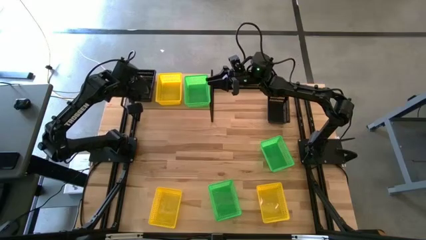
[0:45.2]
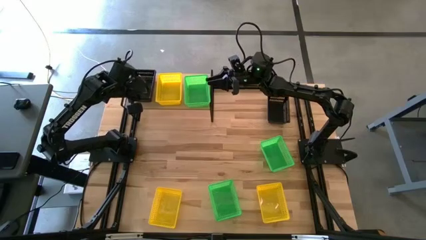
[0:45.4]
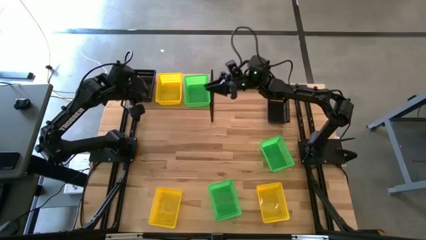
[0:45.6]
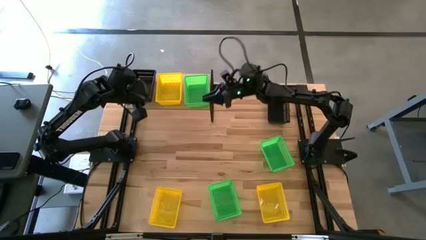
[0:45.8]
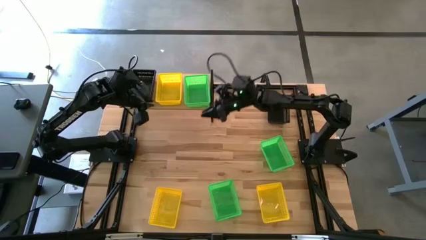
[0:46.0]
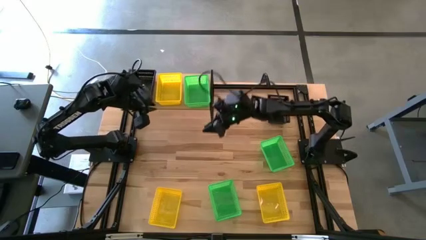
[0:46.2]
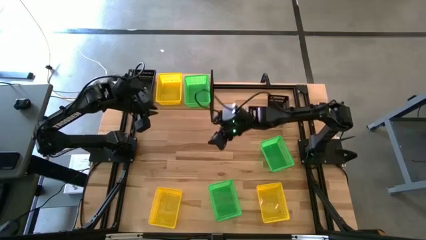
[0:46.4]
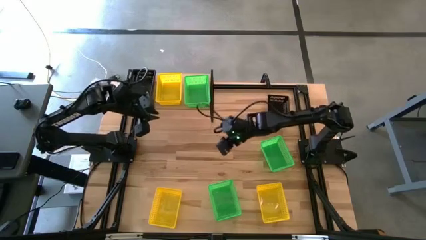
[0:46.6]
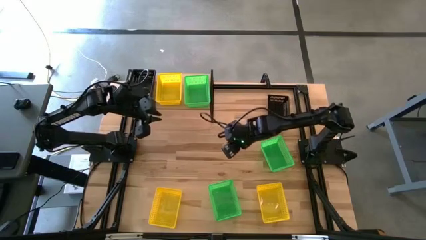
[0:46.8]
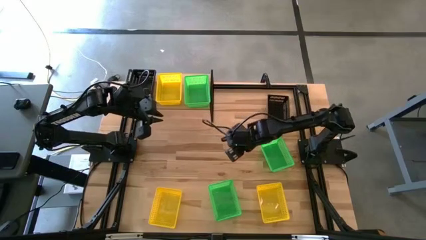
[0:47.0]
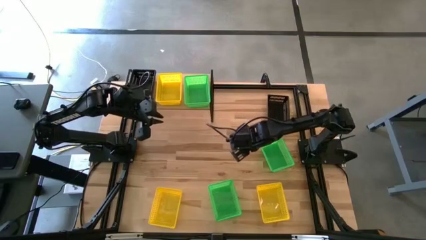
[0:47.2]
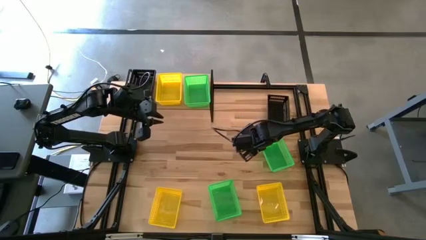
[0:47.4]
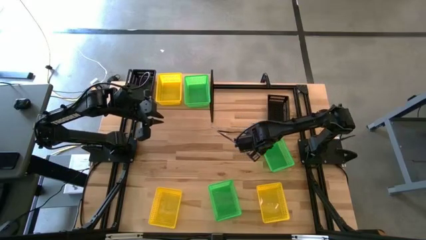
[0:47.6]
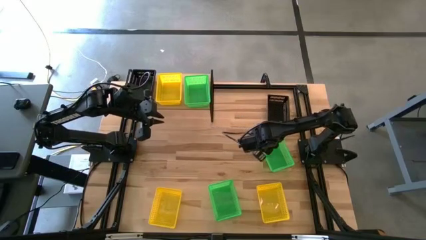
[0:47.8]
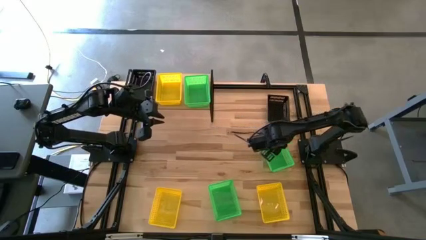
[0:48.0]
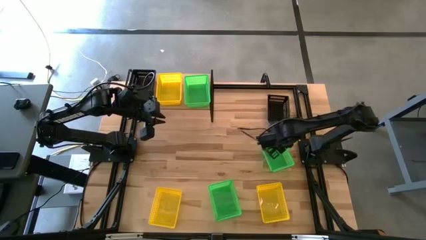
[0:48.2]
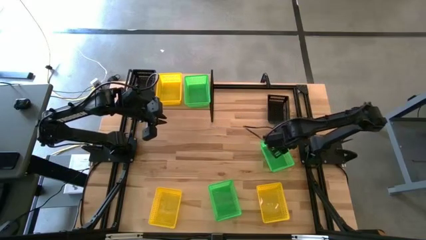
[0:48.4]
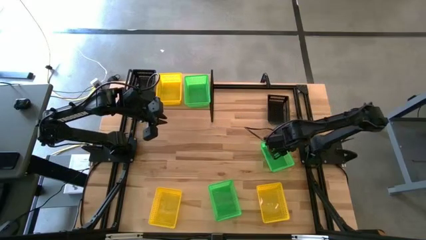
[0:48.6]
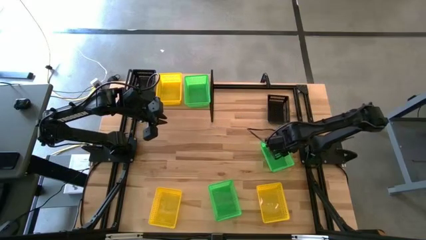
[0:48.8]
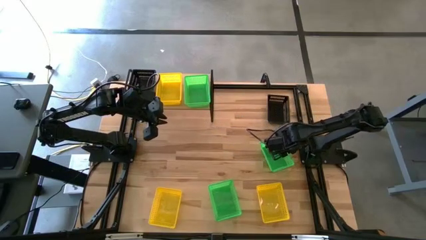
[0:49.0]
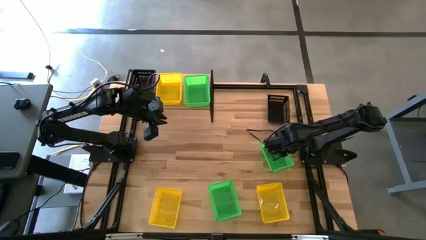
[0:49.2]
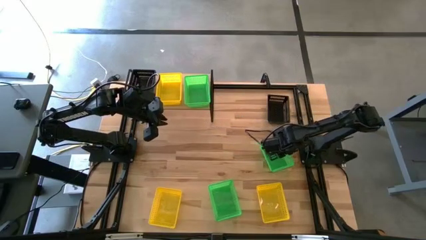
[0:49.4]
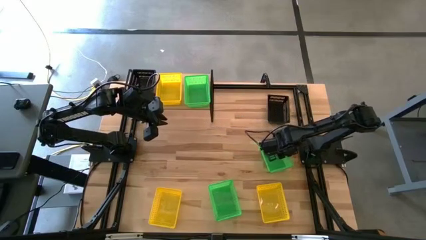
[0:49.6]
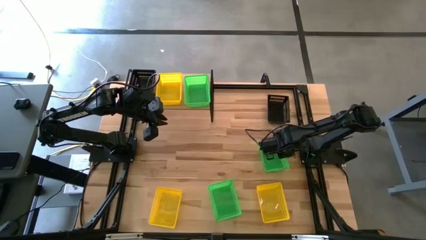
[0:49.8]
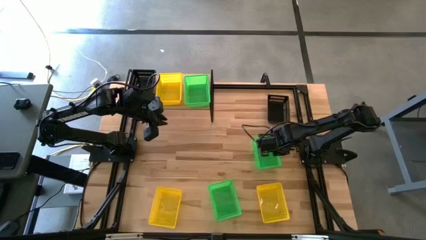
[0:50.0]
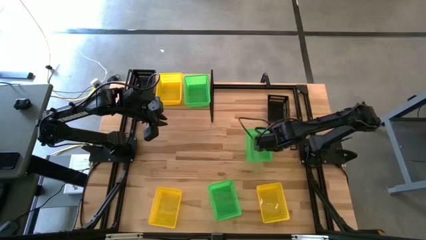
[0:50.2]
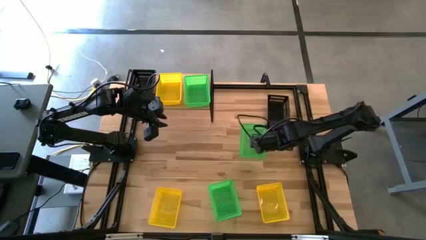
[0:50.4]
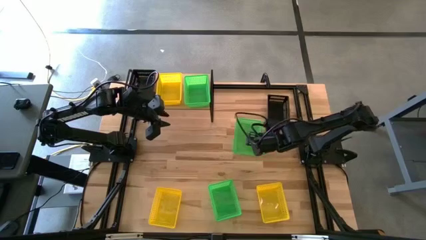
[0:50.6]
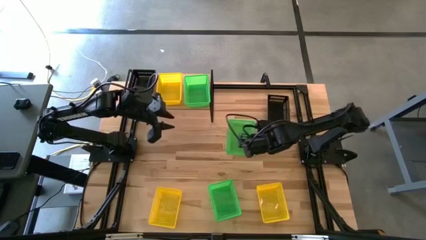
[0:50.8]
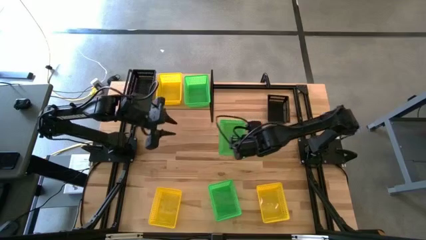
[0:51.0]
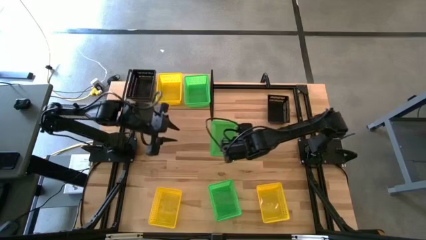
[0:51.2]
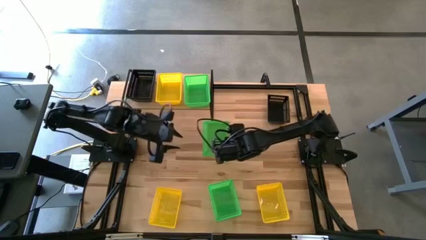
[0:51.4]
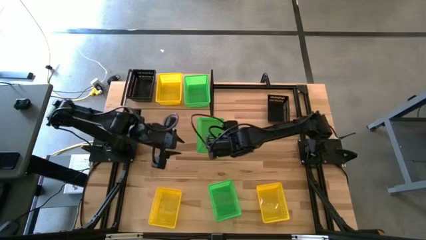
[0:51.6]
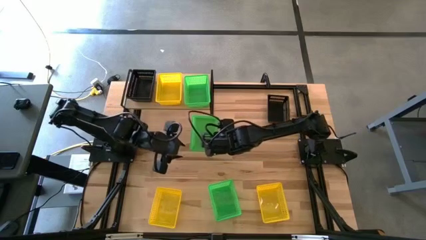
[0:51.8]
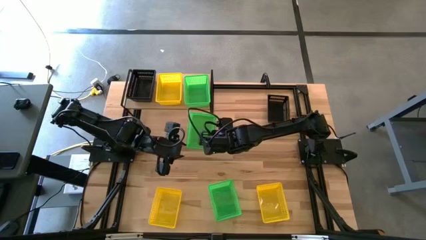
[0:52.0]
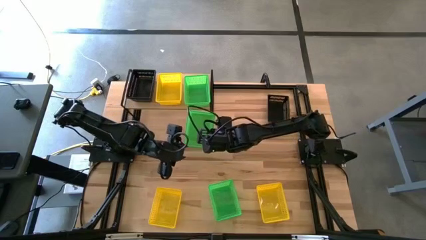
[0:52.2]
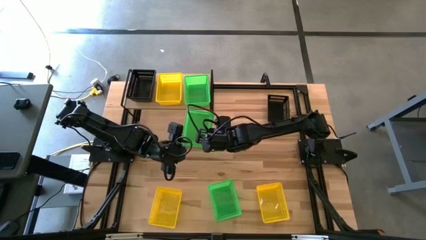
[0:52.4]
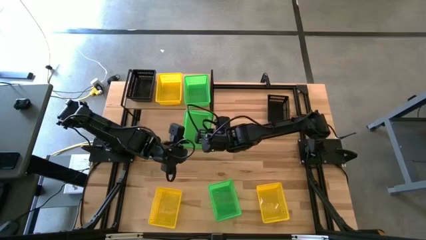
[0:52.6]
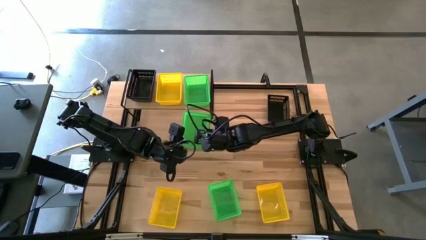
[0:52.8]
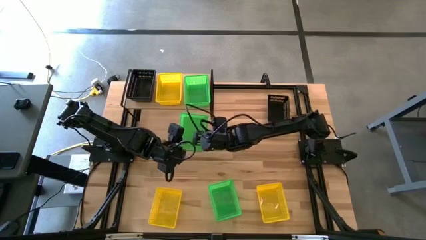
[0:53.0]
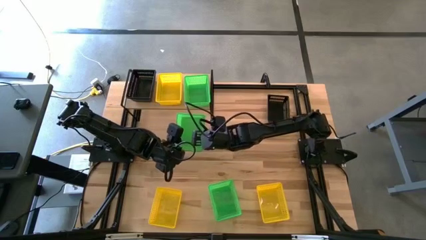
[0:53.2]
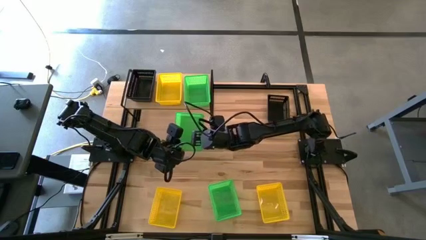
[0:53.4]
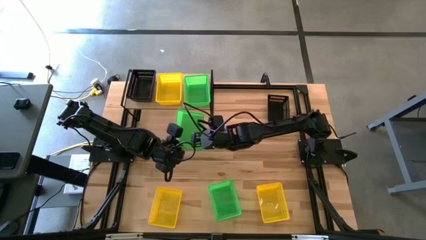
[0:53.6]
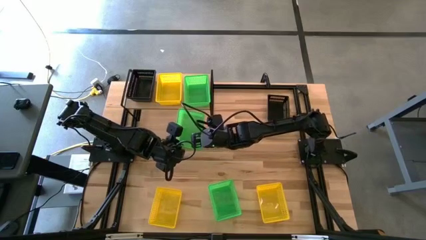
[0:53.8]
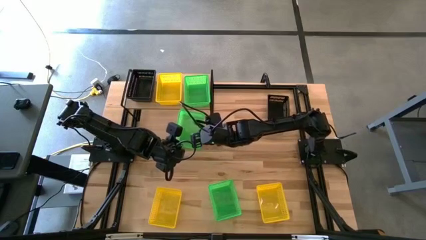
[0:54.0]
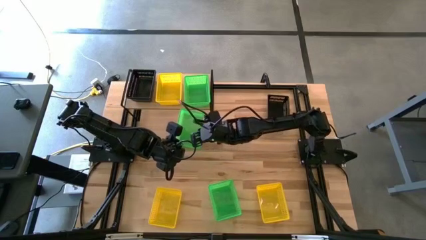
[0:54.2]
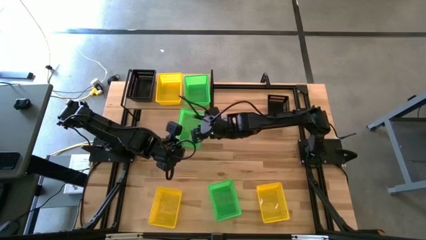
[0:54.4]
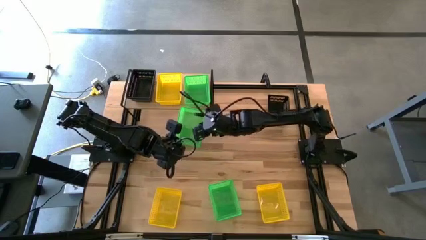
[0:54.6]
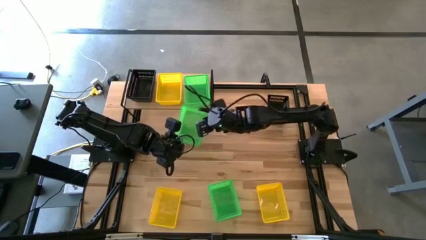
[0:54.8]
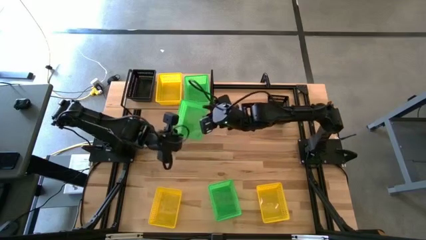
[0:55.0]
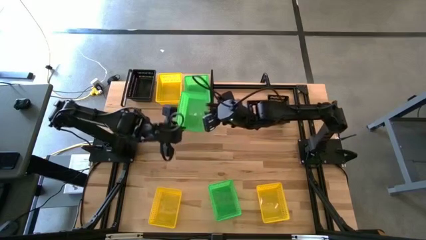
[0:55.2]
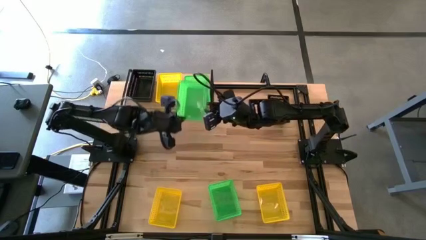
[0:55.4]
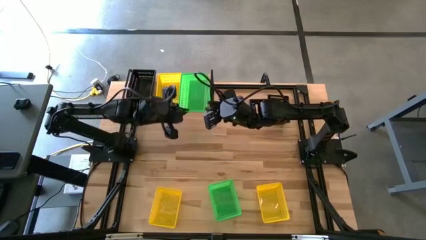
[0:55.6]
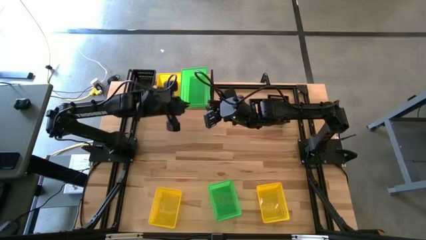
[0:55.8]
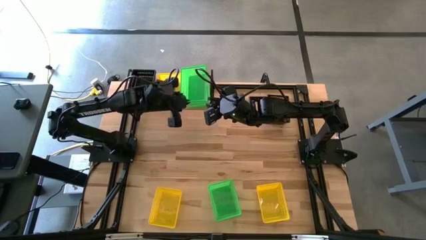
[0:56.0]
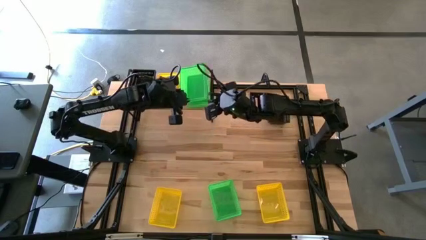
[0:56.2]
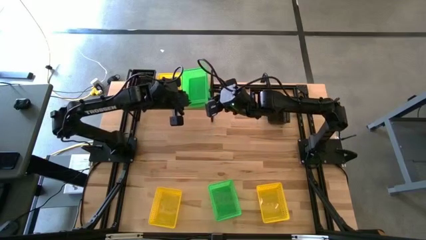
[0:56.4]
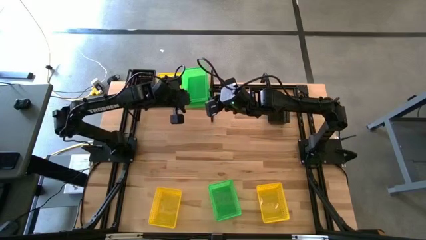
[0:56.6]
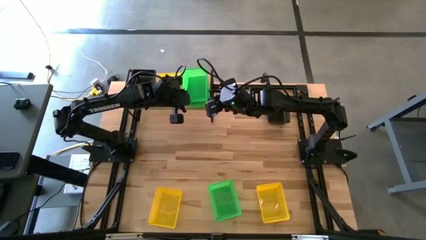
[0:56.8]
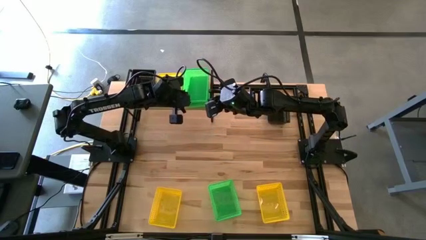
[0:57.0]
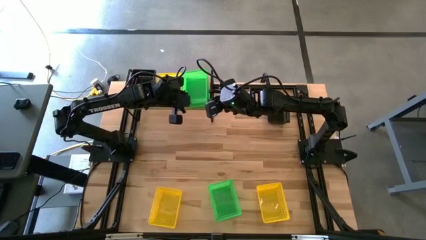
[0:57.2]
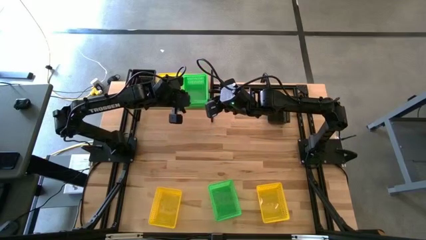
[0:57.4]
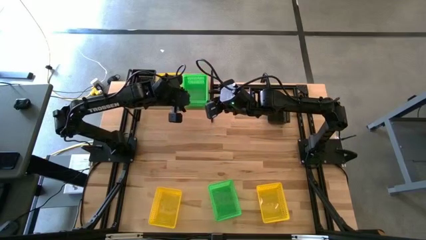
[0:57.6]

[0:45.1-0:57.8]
Task: Stack baskets on shelf by color
Stack the top green basket on top of the green basket on the shelf

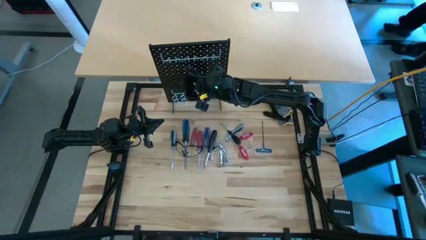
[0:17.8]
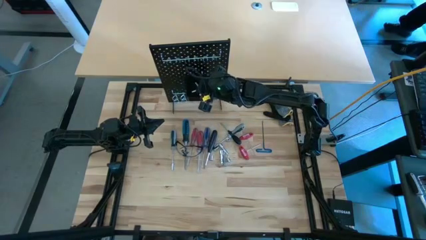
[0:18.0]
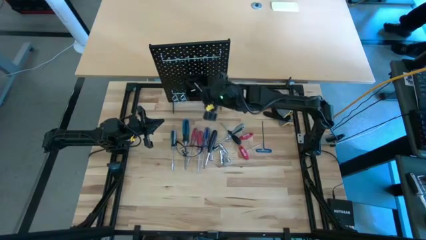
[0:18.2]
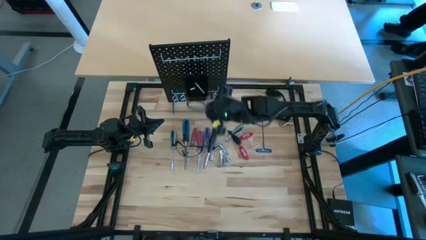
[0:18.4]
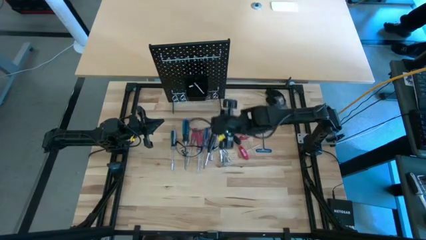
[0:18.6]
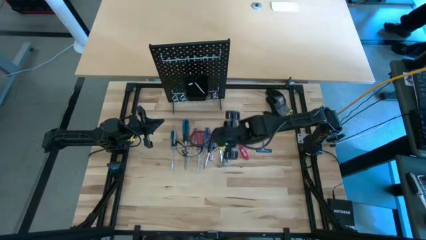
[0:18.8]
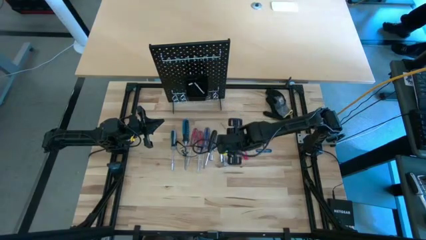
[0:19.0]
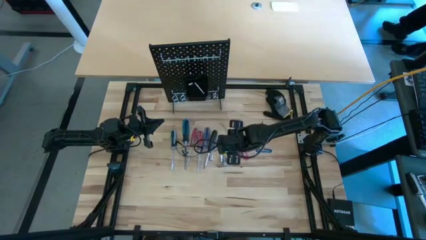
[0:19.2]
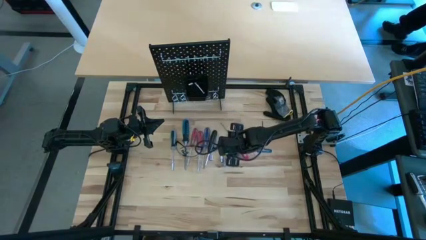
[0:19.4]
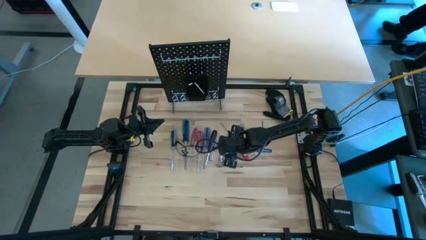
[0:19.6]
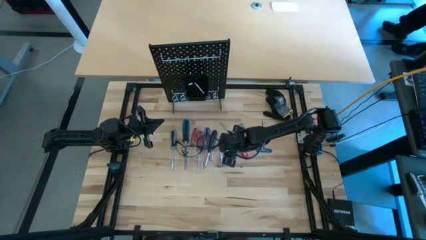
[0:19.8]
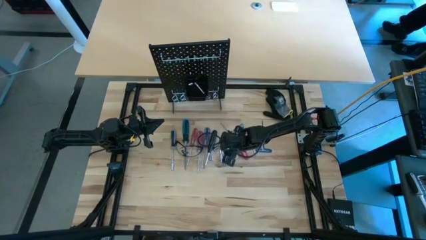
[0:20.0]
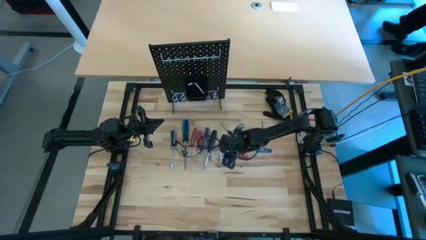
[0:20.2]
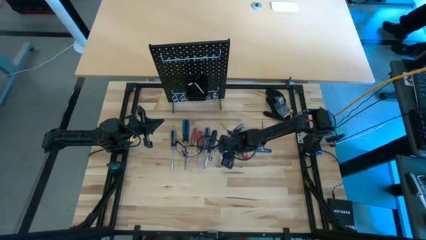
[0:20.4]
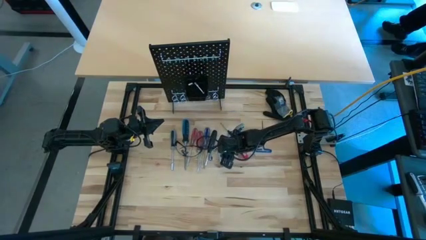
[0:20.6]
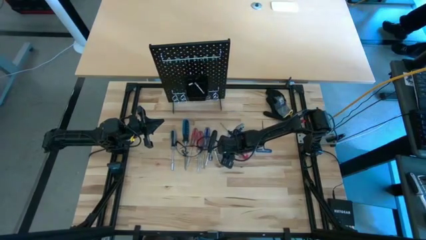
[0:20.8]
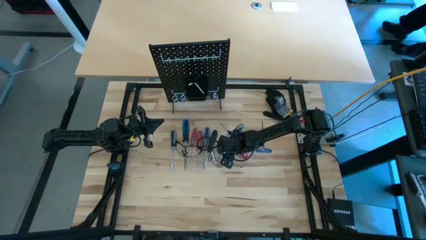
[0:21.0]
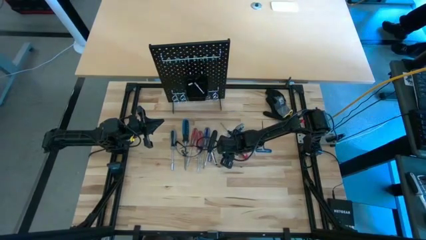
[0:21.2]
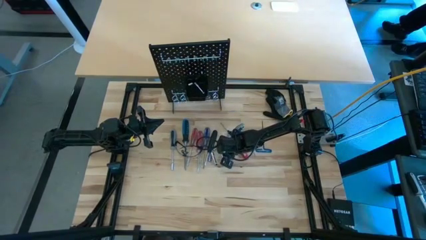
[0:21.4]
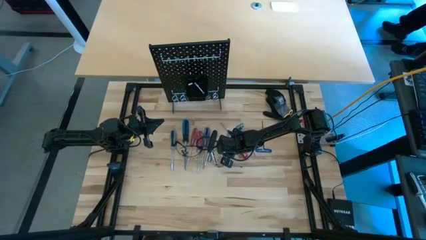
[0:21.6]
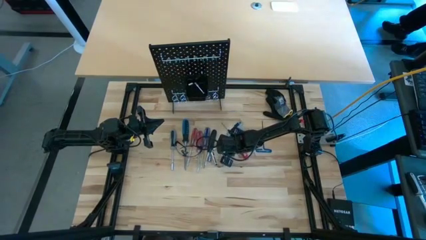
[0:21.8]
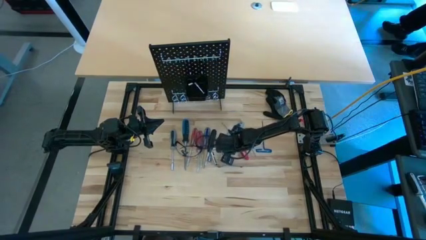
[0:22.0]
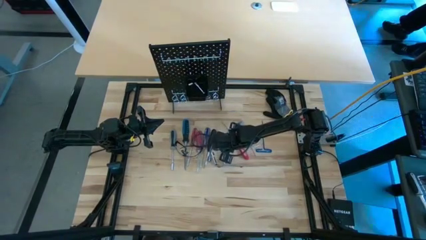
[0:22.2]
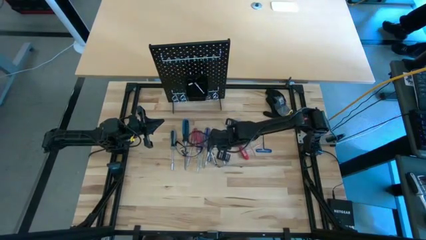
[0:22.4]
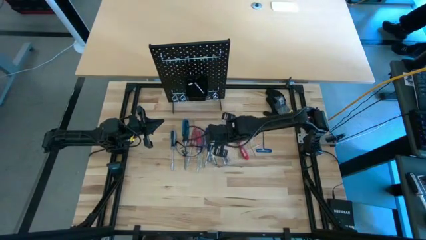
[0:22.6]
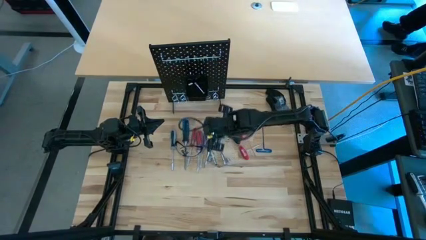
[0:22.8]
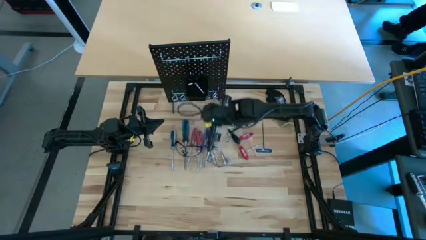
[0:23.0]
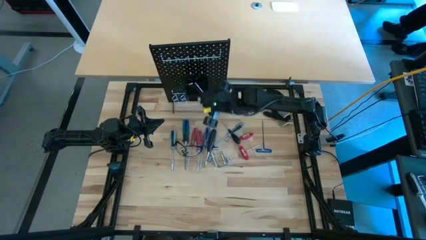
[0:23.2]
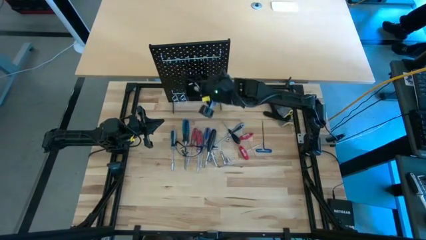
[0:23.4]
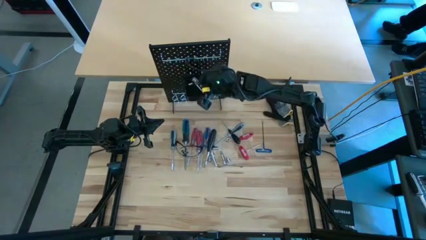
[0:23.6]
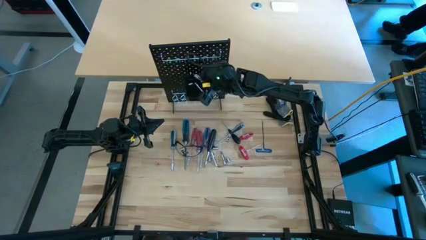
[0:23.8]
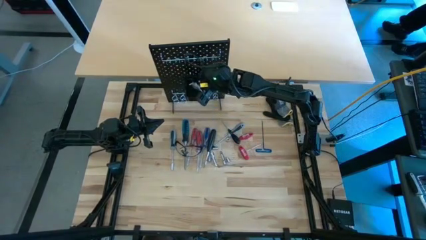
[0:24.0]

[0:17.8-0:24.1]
Task: Hang tools onto peg board
Put the top metal extension bar into the black bin on the peg board
